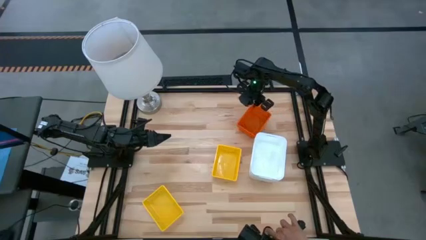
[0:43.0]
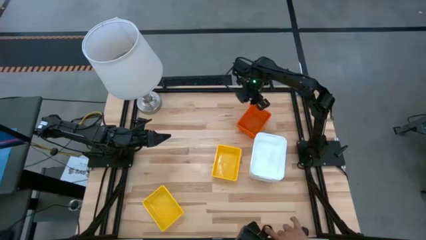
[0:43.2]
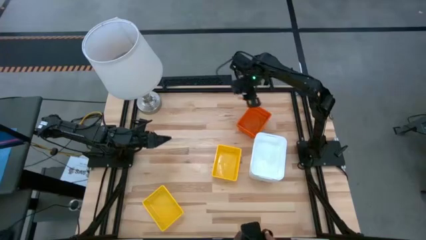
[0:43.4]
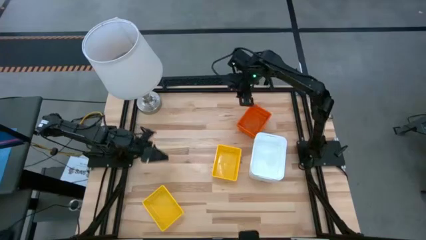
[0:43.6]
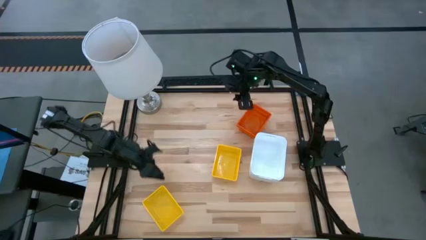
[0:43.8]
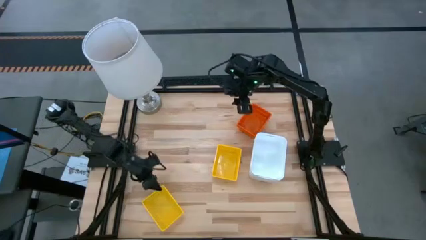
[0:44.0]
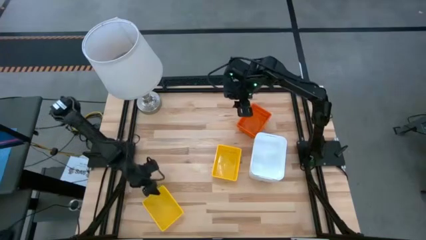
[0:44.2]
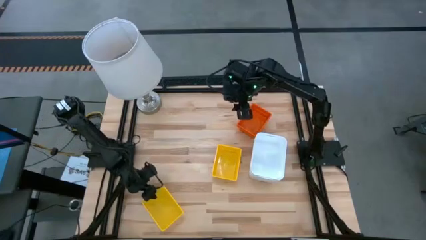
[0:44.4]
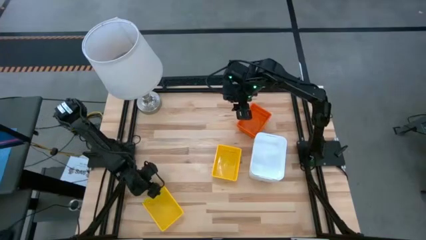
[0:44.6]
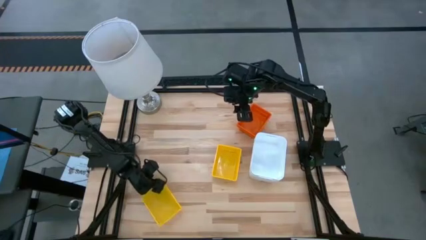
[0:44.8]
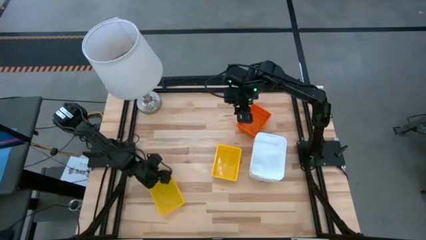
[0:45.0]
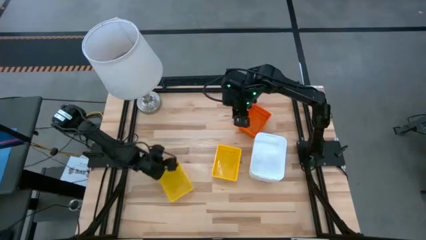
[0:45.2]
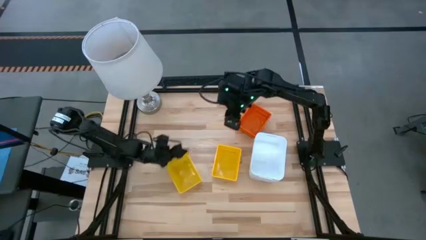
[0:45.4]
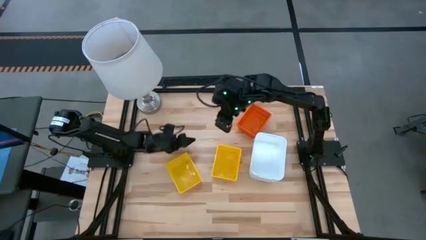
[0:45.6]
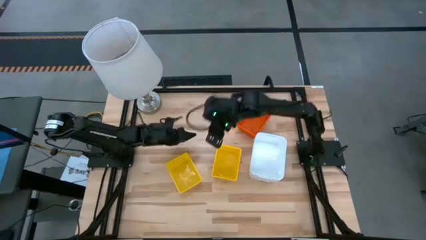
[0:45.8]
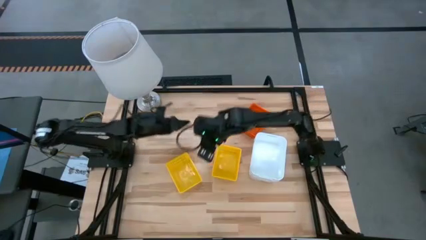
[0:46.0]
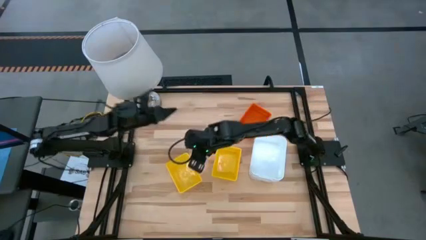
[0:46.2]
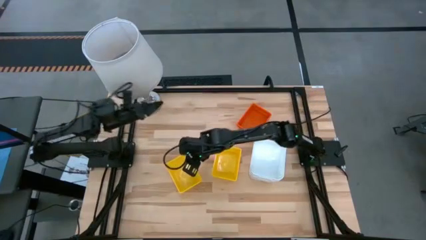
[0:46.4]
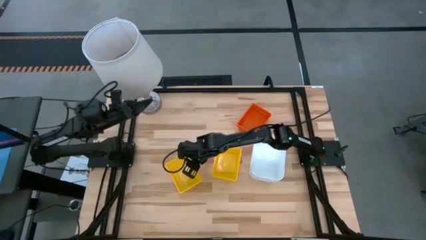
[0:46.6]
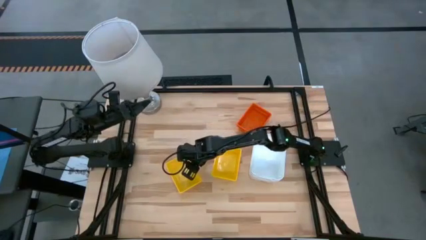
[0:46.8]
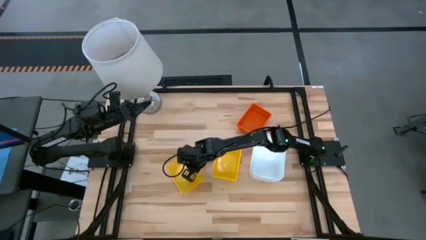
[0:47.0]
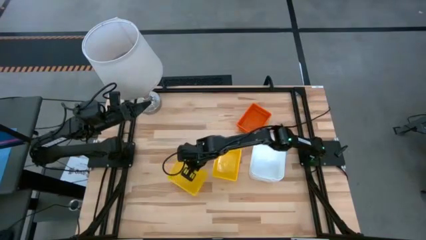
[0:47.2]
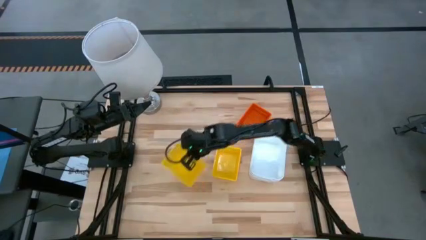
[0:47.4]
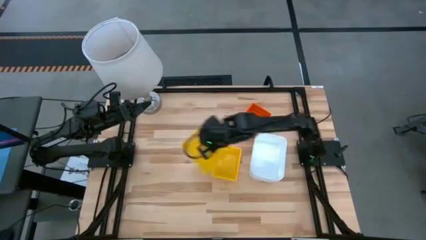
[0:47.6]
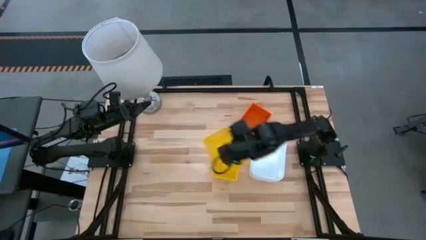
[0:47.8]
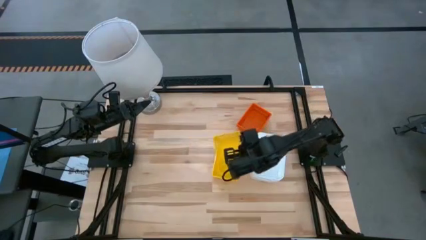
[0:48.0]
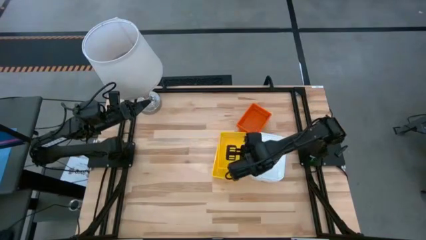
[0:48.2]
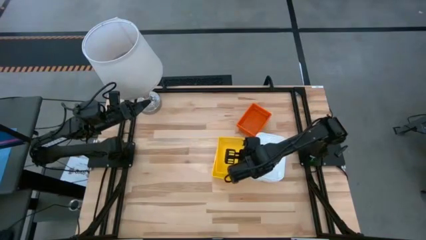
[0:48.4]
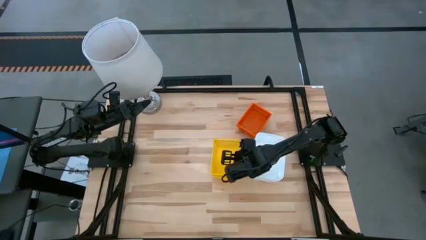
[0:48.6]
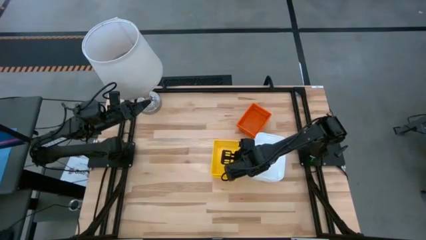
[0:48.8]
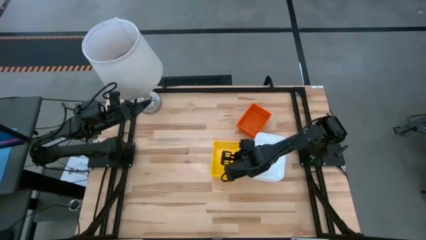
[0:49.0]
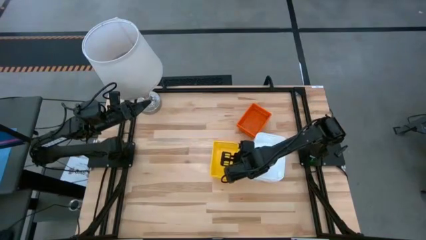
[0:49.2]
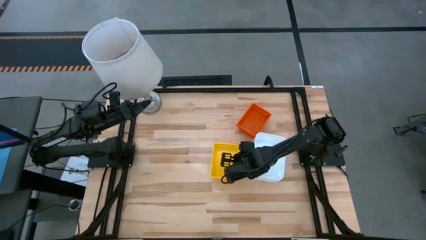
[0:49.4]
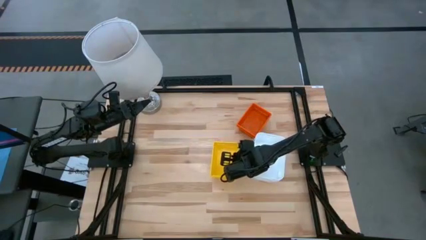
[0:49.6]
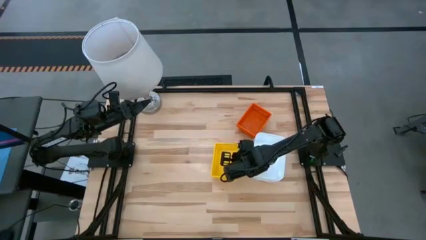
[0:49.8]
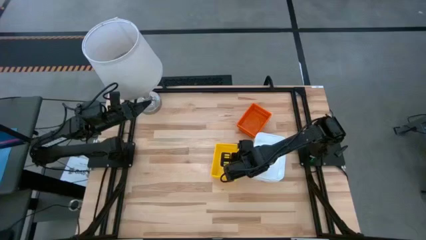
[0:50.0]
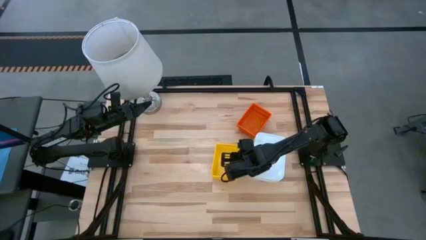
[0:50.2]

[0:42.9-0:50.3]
Stack the bottom yellow bin on the top yellow bin

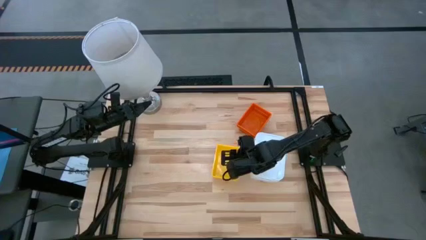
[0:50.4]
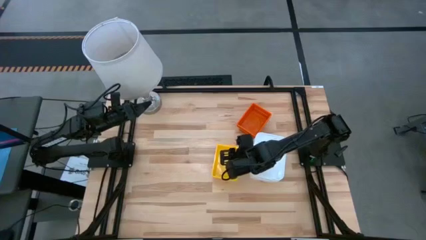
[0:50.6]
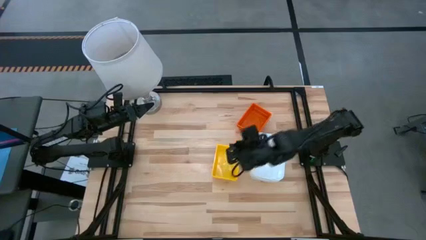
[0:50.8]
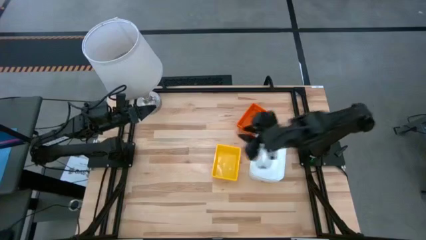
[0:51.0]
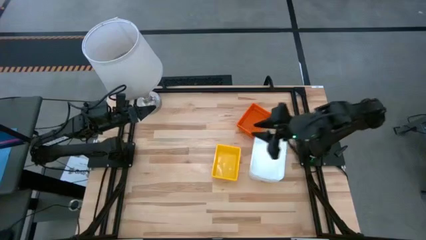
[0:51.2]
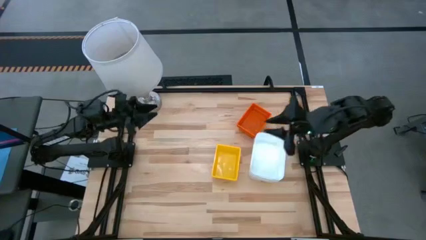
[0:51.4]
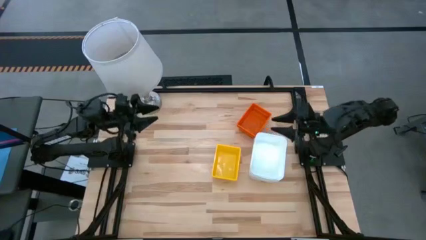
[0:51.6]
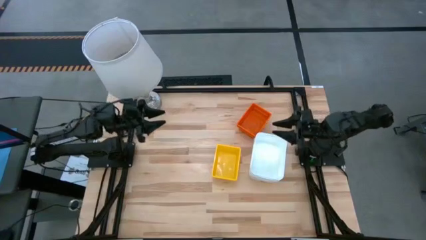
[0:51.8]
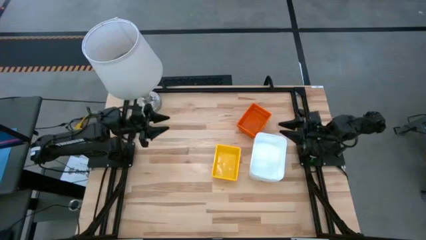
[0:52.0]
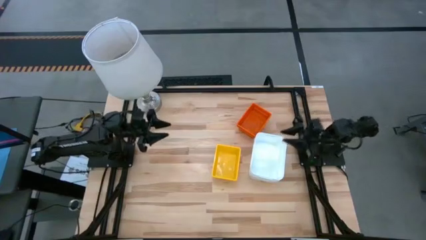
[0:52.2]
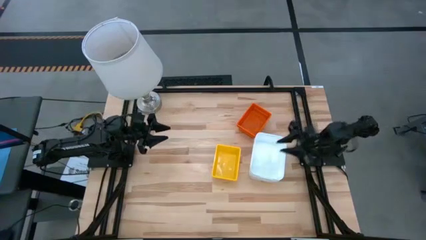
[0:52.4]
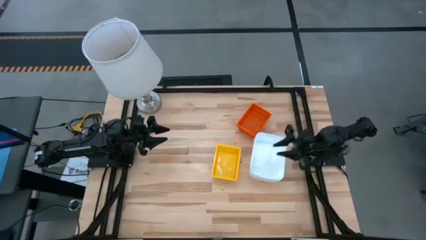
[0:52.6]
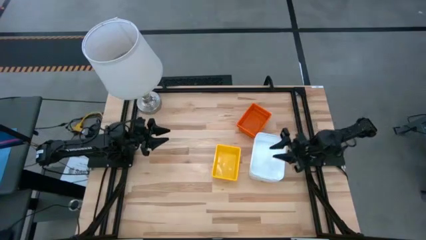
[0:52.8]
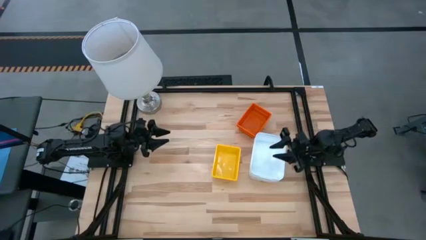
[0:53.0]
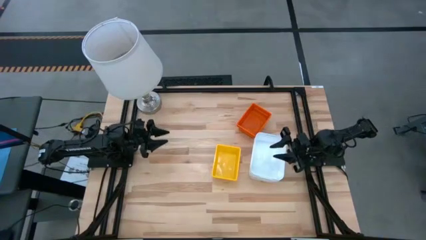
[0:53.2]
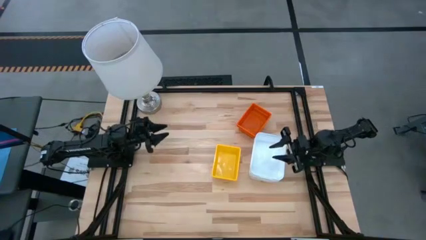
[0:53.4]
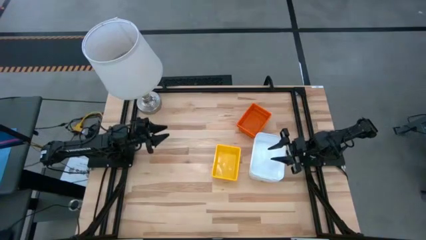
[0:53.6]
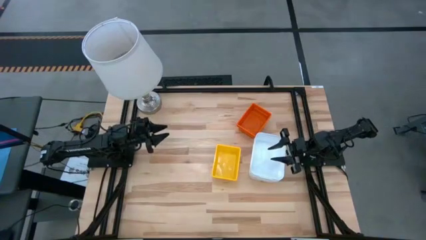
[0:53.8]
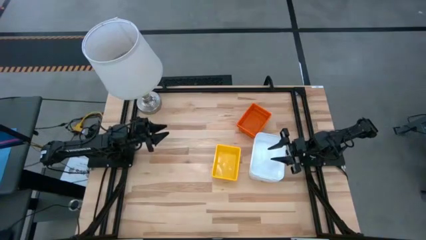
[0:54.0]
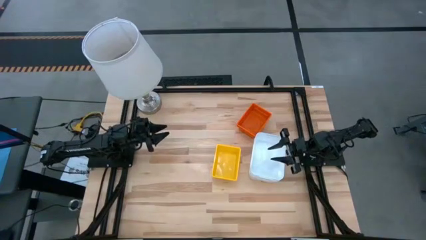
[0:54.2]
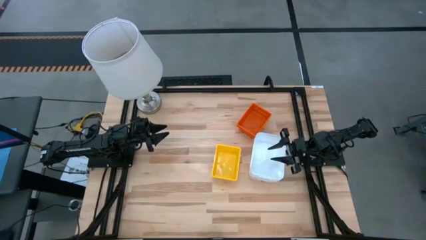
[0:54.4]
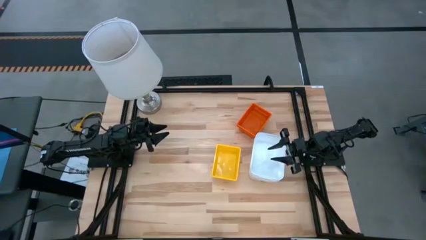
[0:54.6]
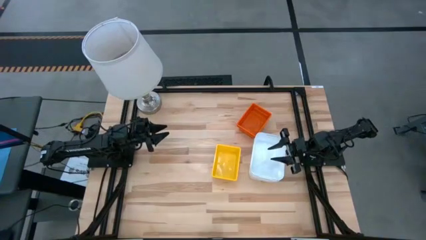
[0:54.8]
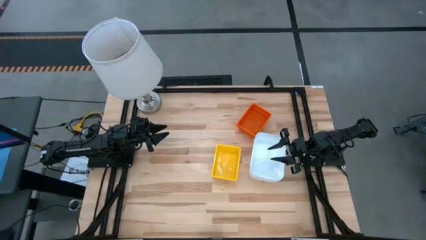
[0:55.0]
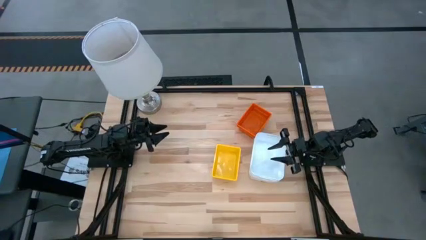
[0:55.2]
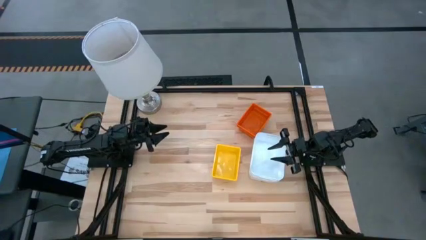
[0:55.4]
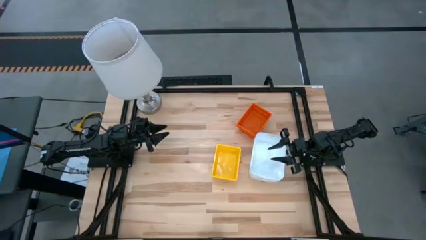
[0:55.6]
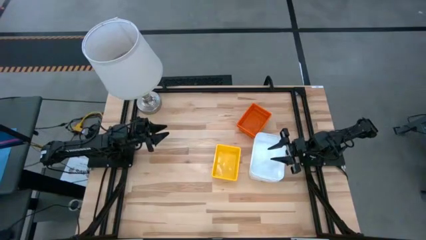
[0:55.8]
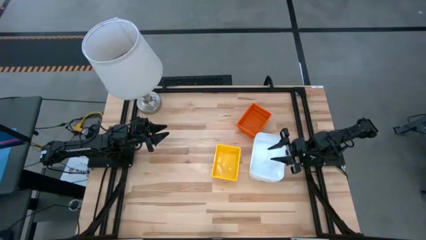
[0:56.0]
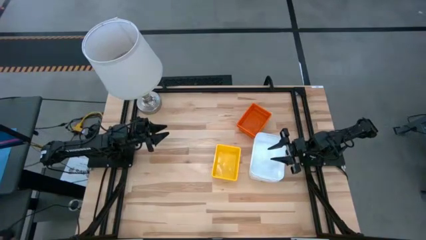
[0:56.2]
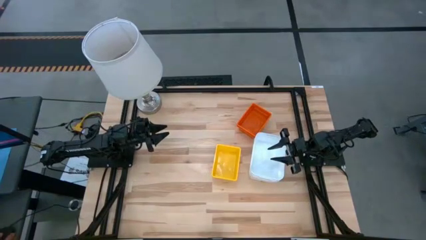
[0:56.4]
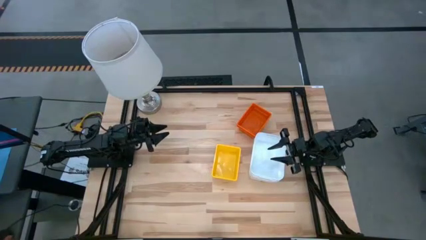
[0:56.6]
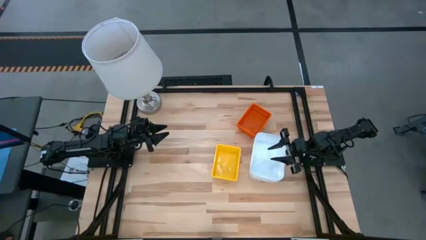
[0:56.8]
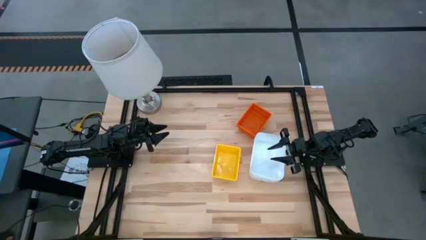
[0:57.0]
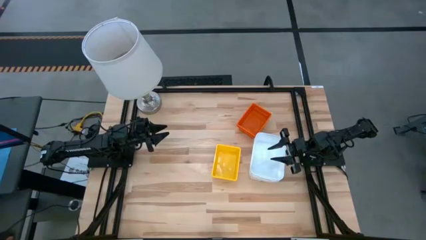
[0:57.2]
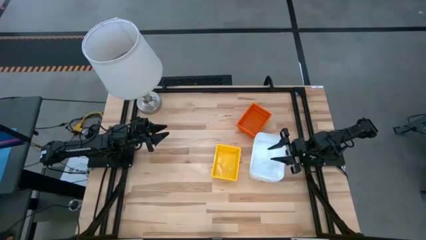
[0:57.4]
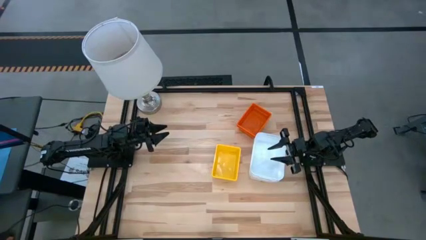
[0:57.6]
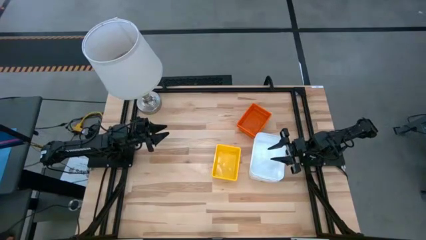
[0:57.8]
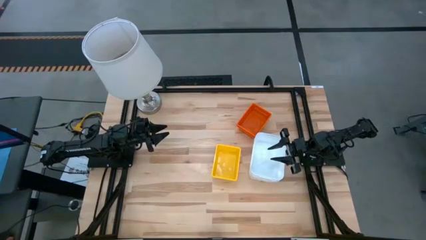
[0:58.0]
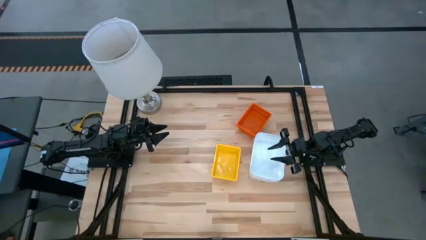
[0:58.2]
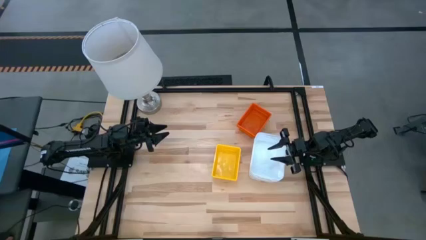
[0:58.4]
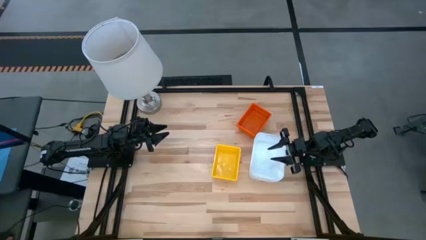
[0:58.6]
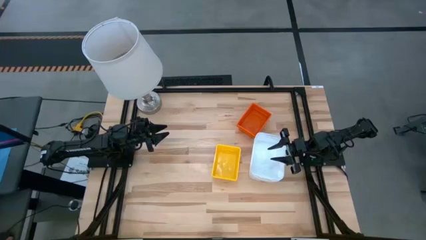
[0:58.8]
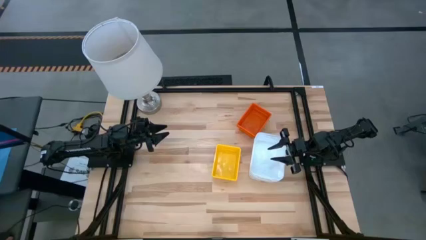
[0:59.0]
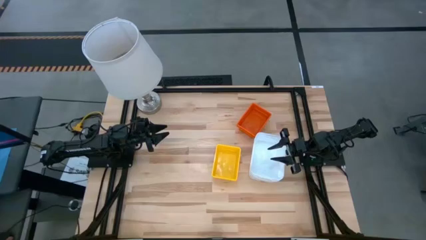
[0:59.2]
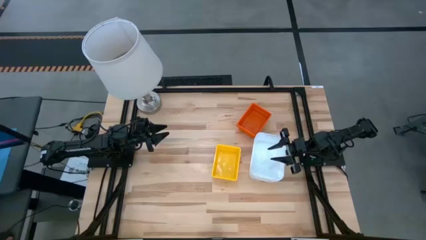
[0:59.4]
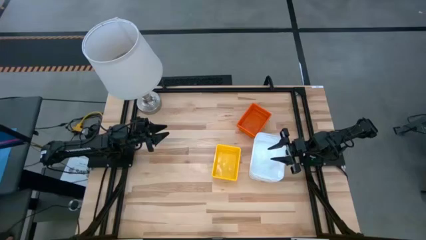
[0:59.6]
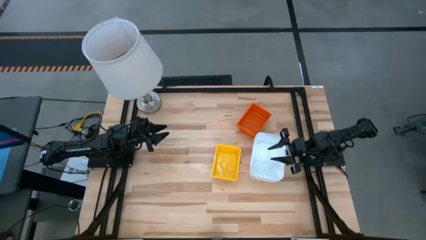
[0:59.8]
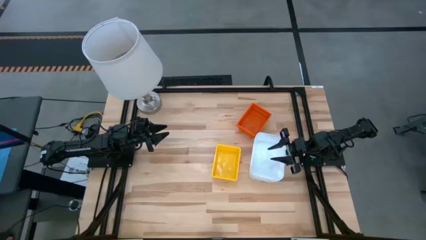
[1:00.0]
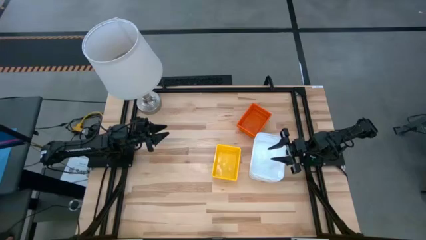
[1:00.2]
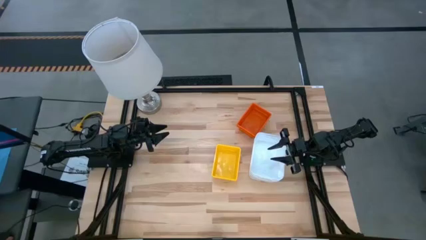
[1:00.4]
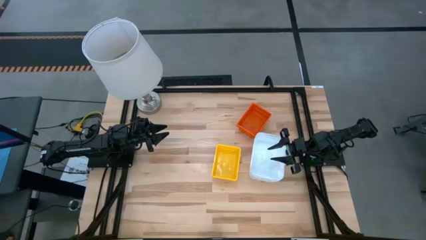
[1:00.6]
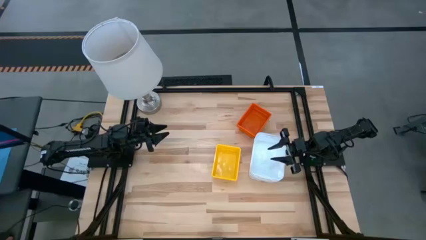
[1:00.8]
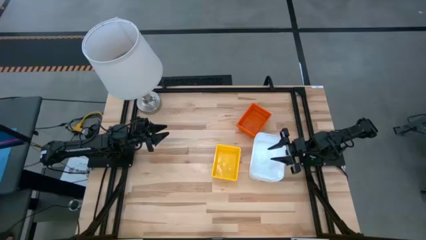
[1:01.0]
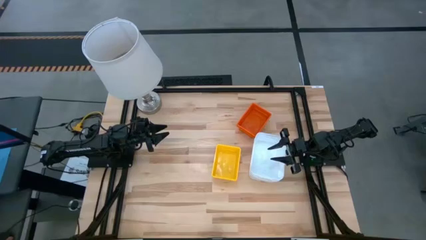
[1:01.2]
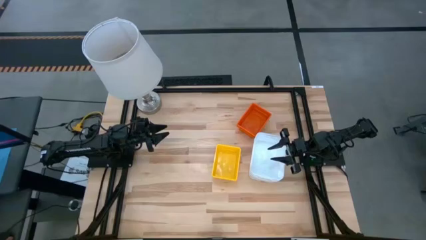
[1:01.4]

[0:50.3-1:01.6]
Return to Home Position
